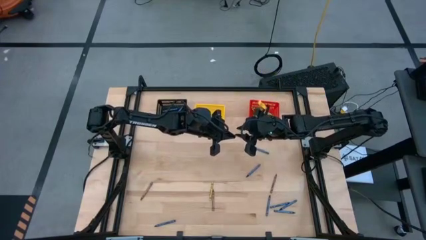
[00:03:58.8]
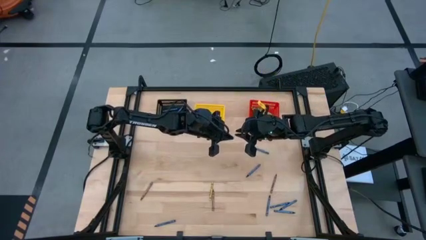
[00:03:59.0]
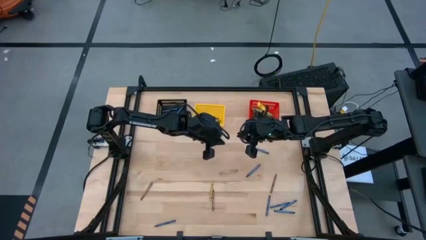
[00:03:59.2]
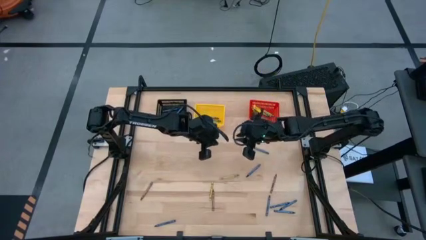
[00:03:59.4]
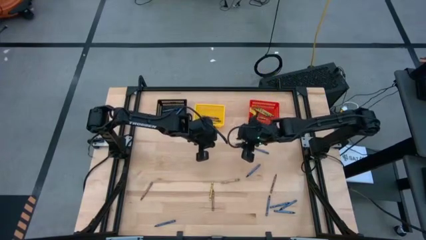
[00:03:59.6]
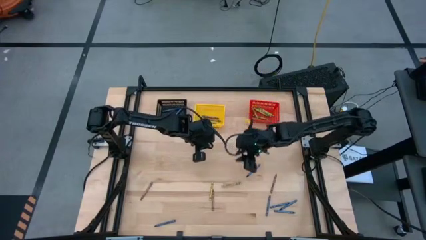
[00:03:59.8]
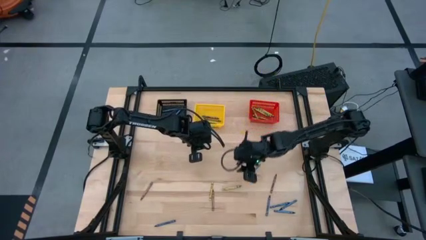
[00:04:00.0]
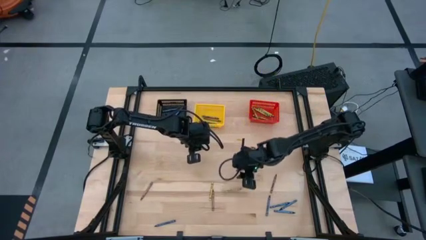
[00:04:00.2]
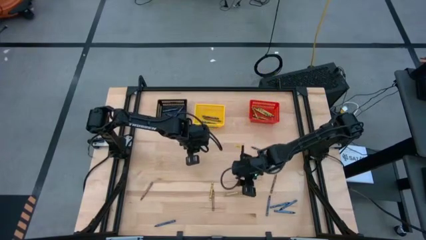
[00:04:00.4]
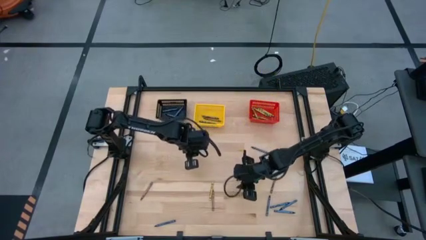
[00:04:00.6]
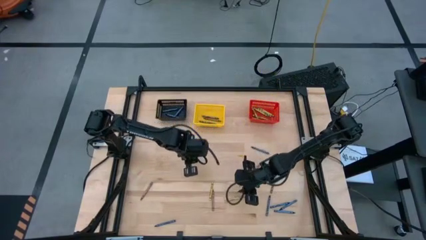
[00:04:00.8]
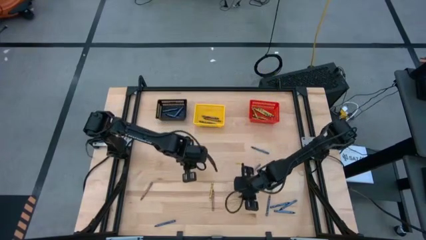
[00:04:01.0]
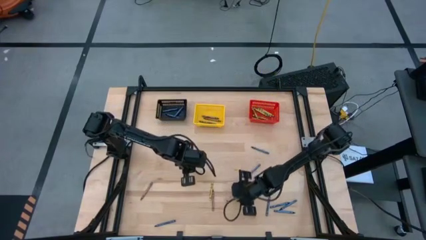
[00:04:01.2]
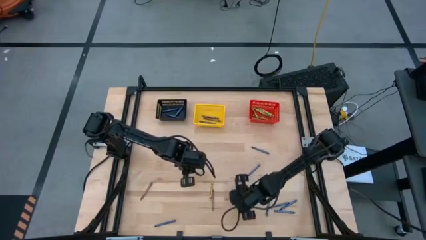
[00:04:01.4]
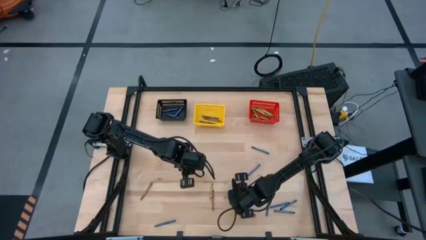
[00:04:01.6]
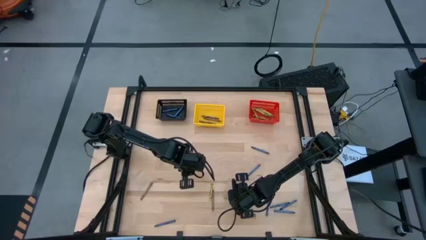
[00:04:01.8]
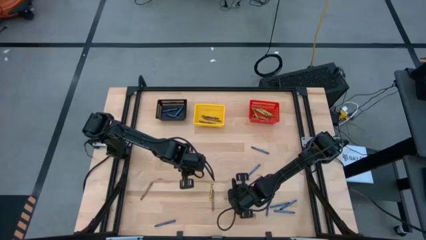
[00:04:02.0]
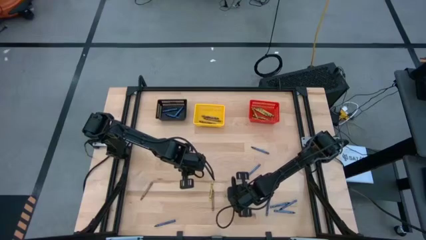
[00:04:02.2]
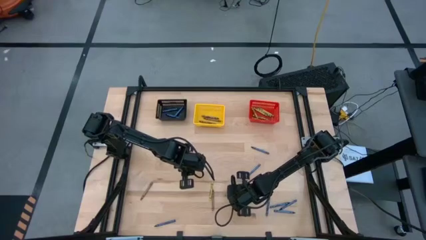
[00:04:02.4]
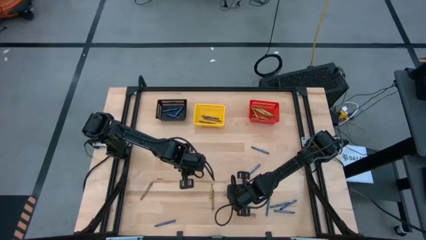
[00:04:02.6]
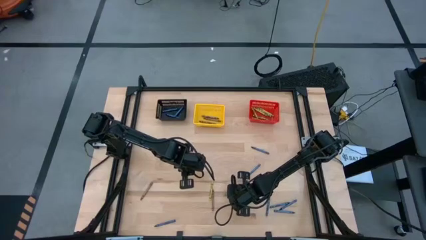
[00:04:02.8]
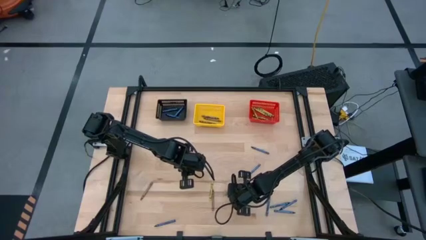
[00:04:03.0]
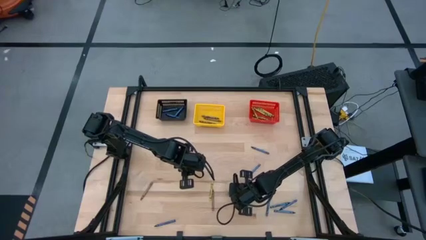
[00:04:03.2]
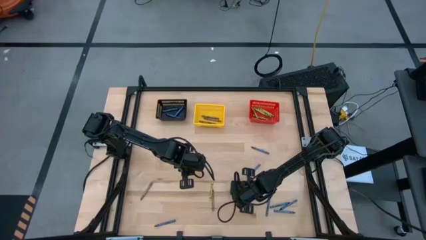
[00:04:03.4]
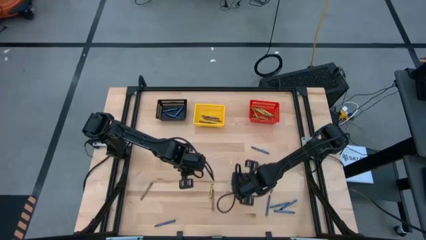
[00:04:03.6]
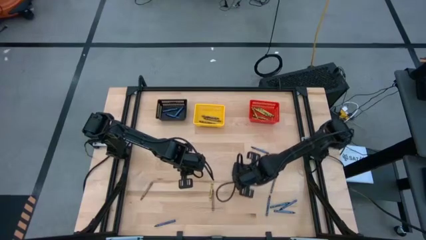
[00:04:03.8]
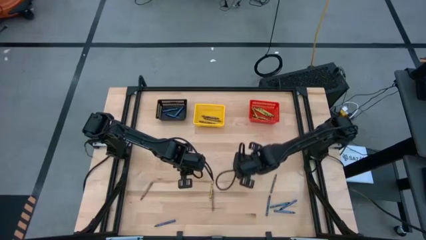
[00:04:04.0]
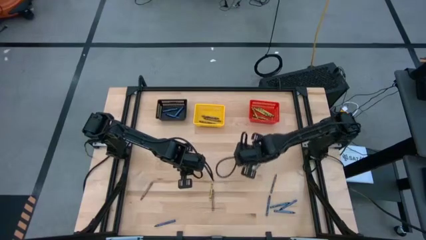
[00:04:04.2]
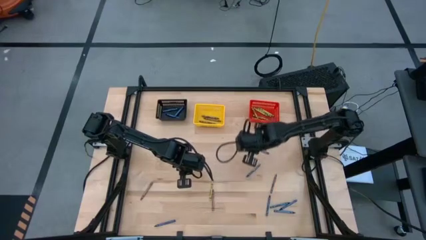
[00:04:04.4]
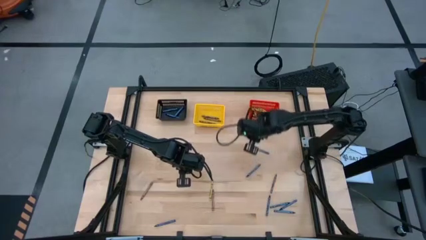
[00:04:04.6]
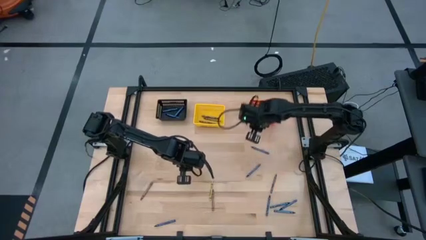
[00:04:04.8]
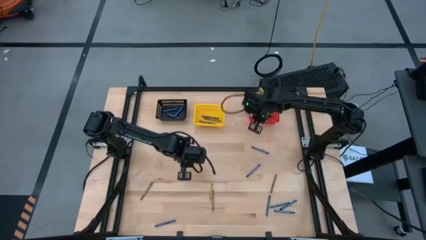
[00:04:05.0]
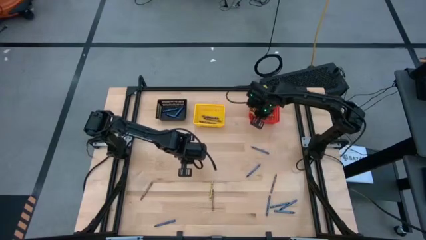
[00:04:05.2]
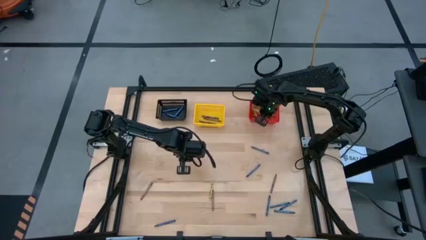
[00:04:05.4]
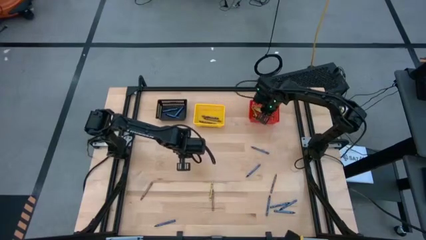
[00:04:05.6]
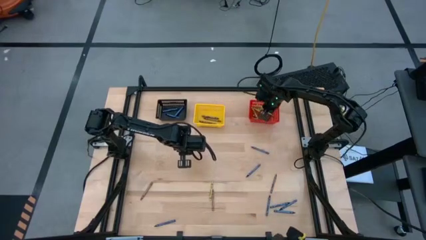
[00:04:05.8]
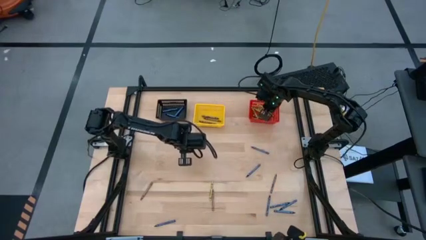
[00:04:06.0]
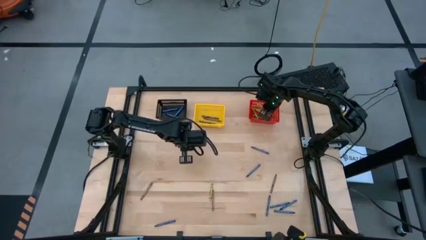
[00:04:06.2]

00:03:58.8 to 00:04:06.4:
Task: Sort crayons
Put the right green crayon into the red bin

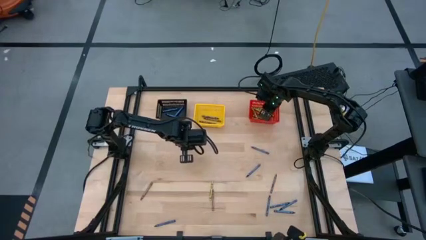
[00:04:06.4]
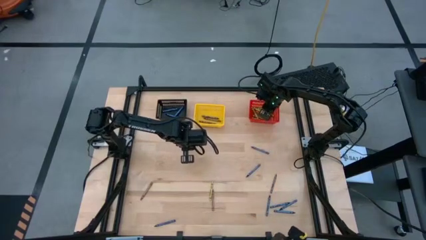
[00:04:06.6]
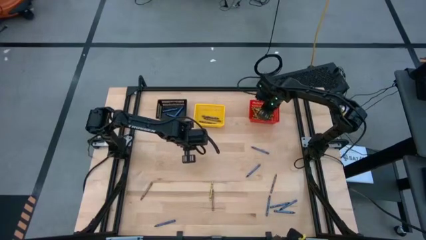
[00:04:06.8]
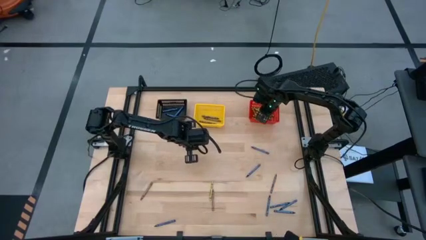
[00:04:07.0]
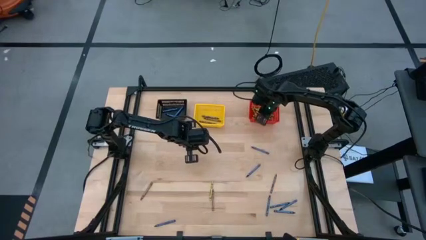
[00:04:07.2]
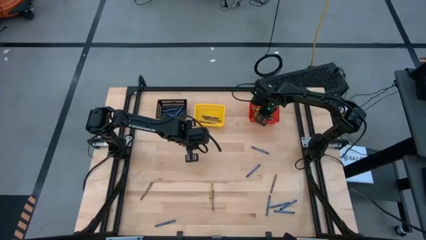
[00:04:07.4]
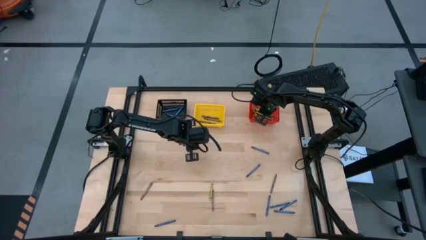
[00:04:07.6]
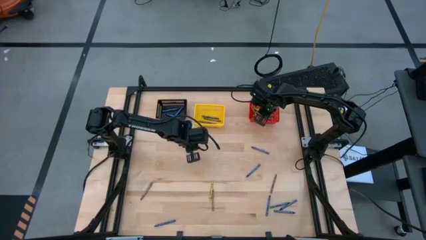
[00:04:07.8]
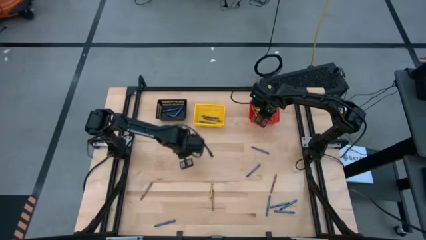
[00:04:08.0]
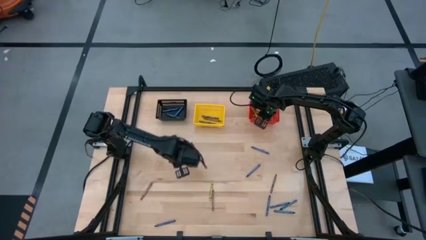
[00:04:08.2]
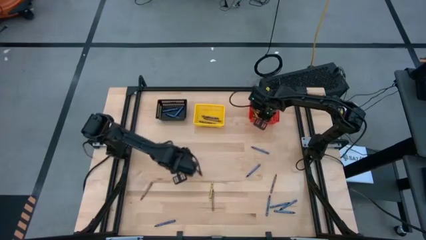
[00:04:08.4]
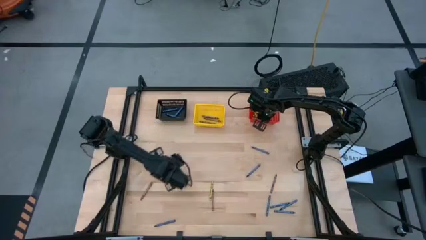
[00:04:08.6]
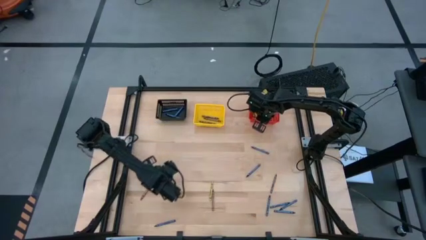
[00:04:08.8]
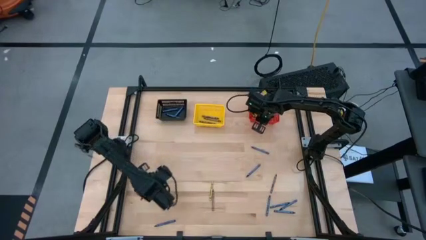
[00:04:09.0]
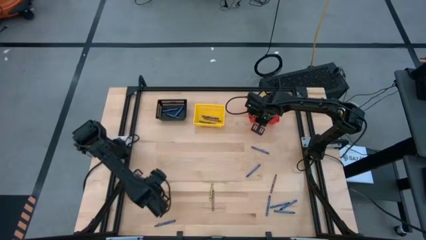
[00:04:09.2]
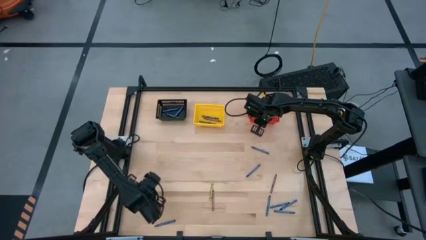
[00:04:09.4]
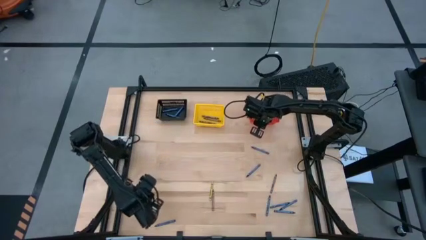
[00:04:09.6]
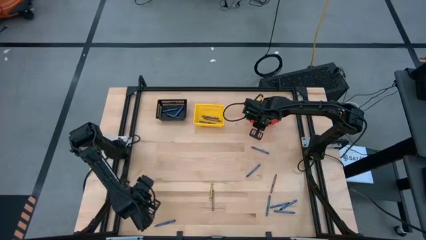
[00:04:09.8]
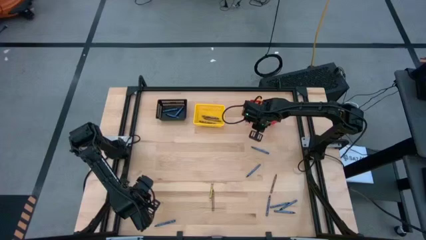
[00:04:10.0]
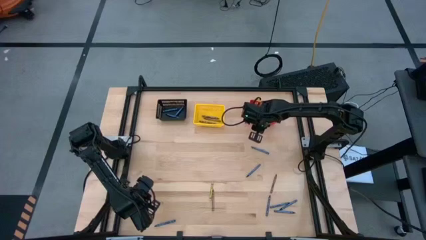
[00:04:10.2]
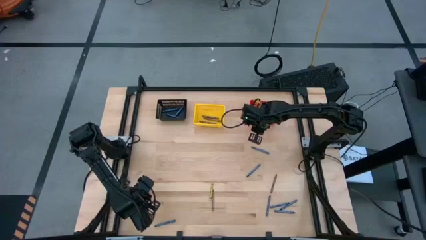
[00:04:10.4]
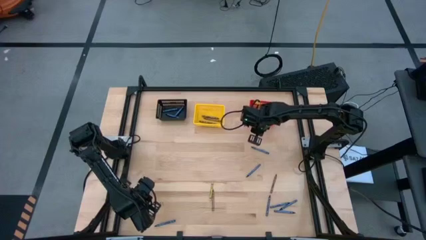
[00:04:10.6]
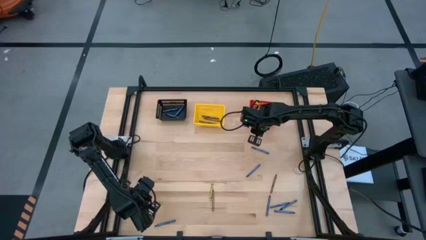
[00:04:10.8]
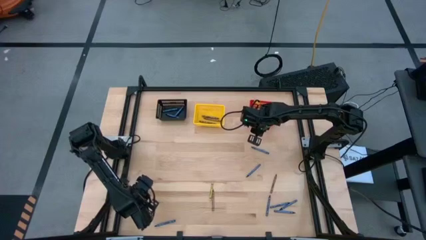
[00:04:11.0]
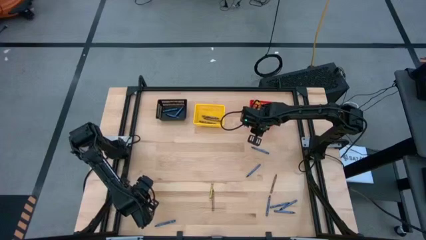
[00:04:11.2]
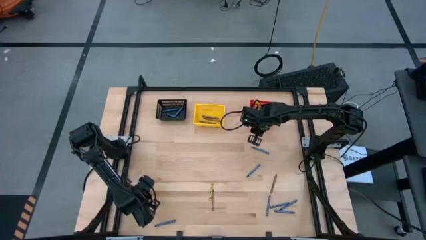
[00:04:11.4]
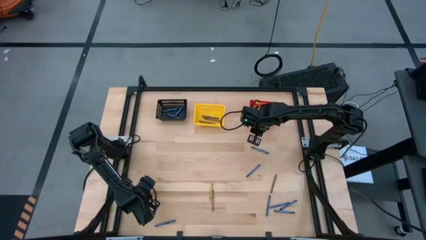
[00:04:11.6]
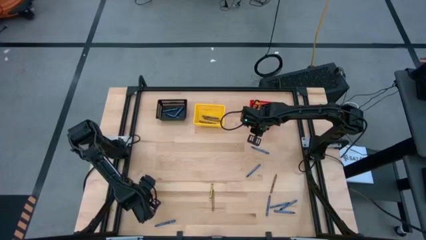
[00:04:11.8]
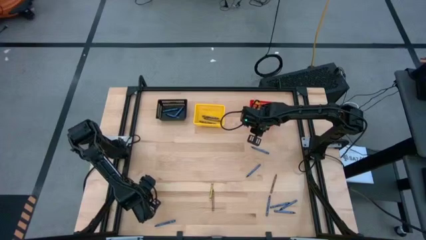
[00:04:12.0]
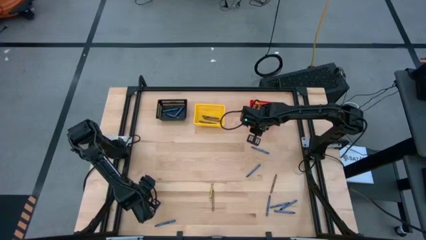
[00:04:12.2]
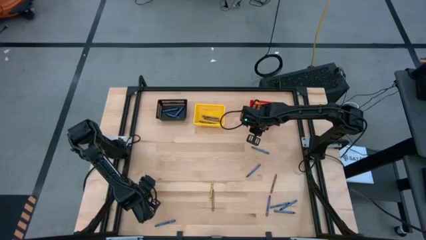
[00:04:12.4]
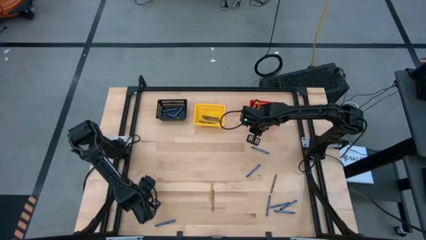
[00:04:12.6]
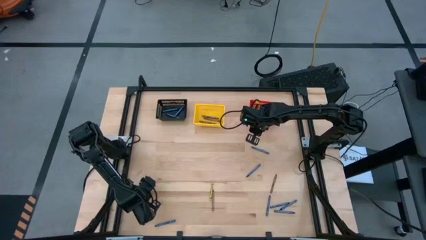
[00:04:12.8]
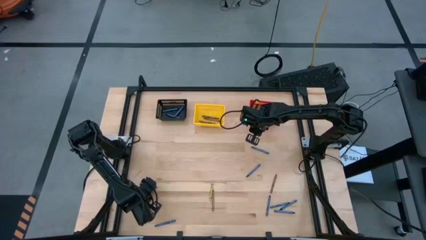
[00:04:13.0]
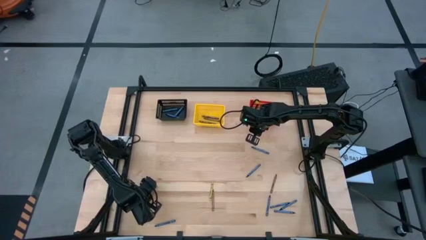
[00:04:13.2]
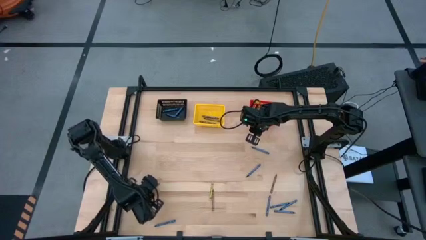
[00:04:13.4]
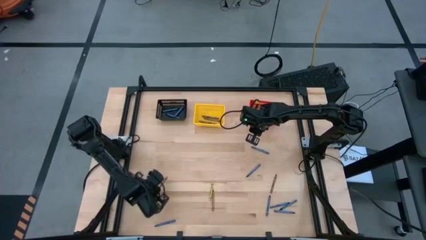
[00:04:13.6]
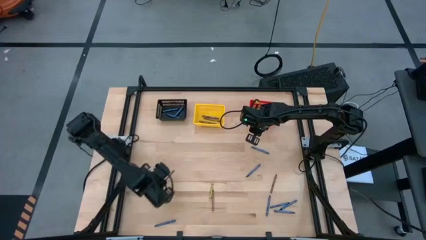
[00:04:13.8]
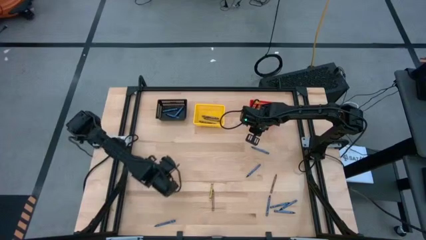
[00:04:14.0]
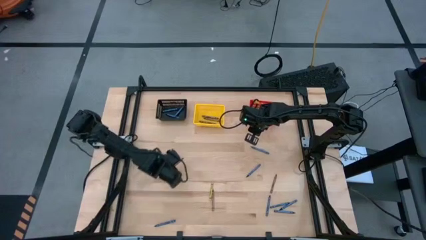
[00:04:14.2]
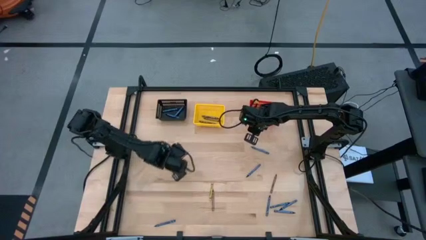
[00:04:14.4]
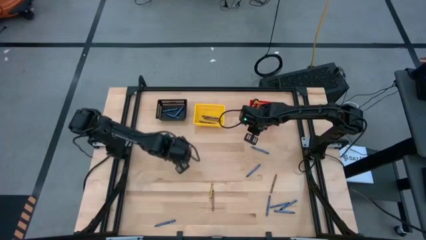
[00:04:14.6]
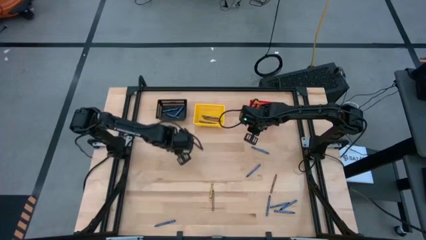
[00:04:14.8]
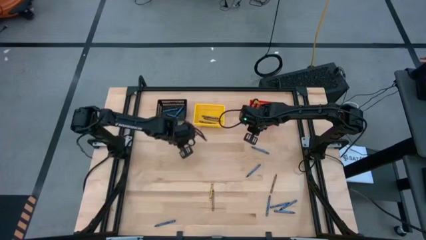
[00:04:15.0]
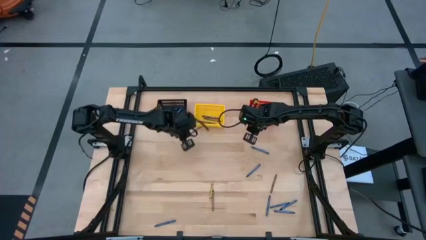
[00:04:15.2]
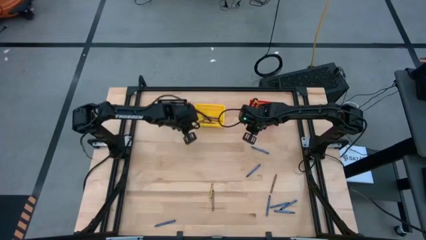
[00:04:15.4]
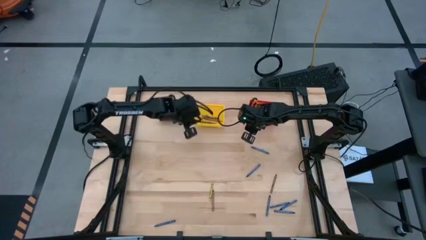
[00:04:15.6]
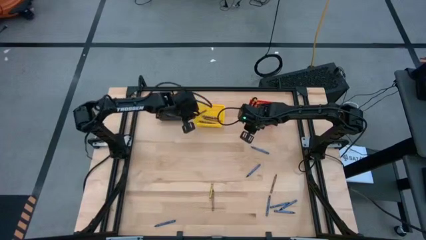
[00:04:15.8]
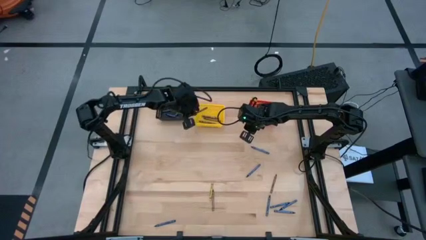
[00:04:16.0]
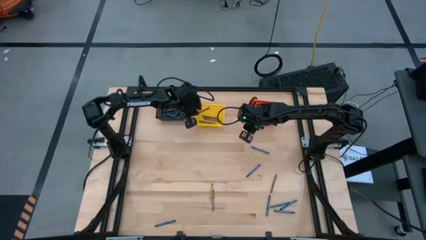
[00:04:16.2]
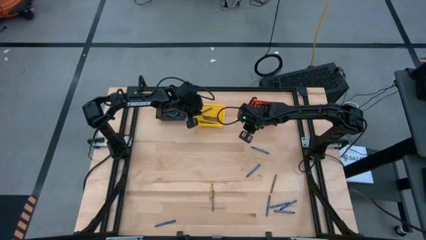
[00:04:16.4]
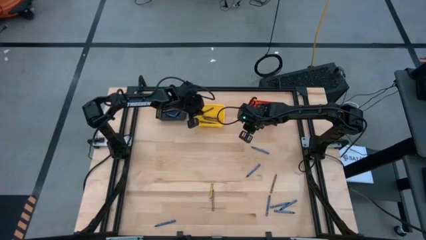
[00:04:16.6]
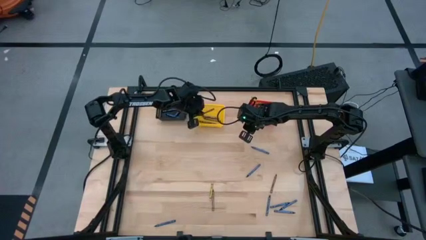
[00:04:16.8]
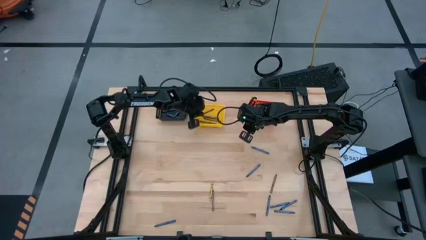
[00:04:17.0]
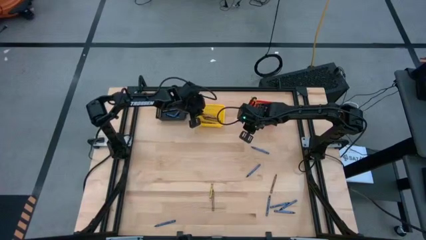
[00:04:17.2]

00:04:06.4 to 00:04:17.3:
Put the left brown crayon into the yellow bin
